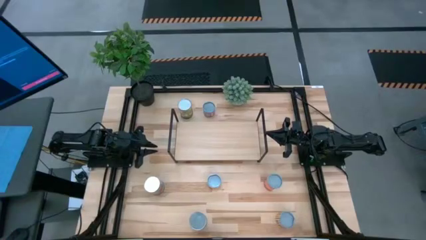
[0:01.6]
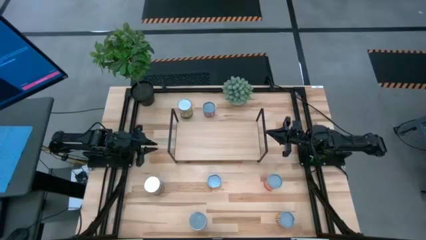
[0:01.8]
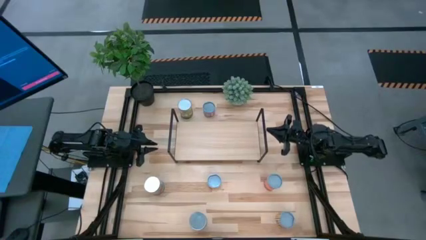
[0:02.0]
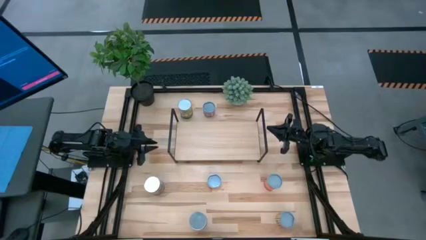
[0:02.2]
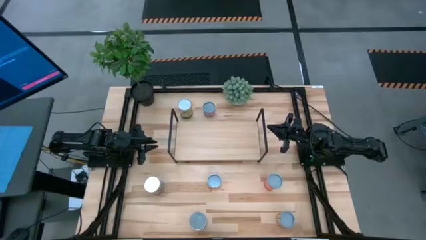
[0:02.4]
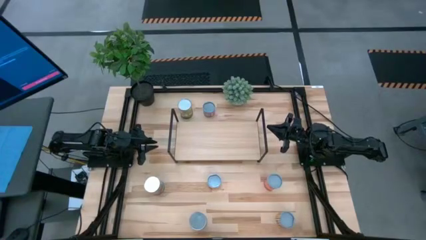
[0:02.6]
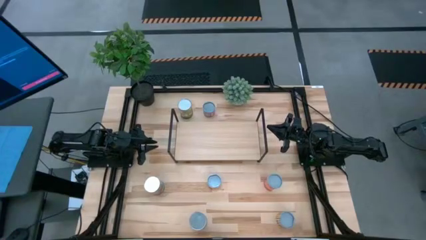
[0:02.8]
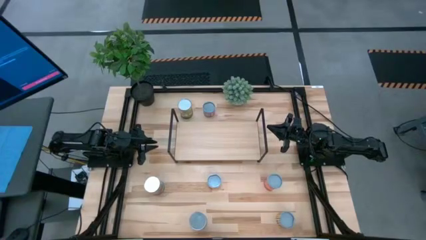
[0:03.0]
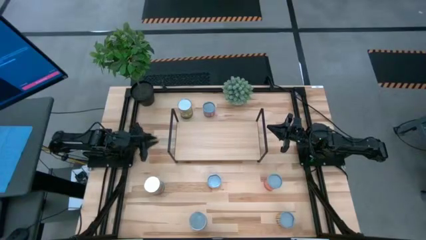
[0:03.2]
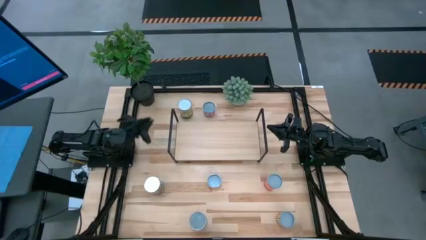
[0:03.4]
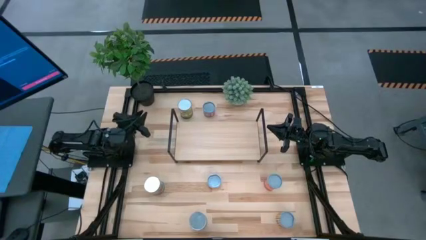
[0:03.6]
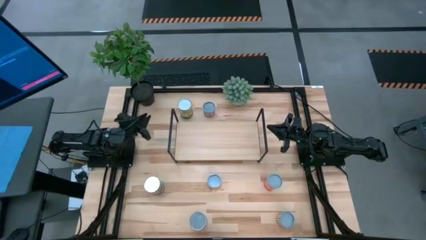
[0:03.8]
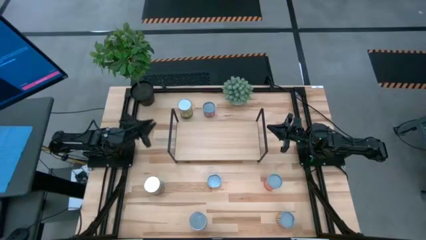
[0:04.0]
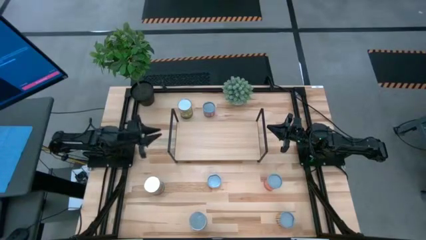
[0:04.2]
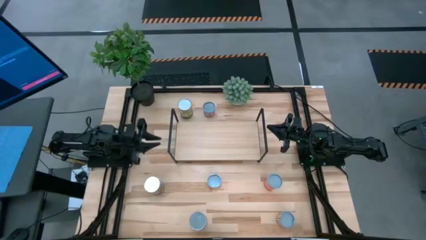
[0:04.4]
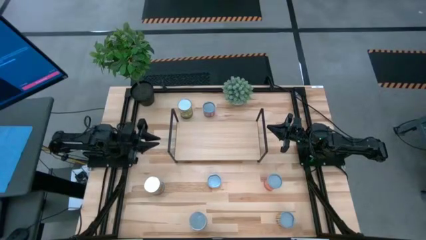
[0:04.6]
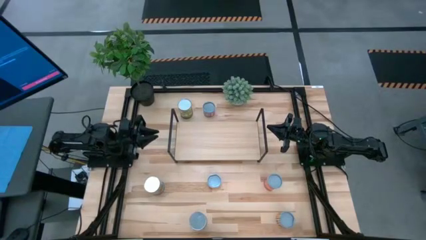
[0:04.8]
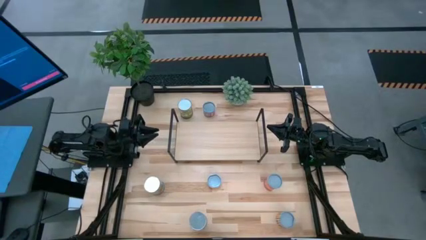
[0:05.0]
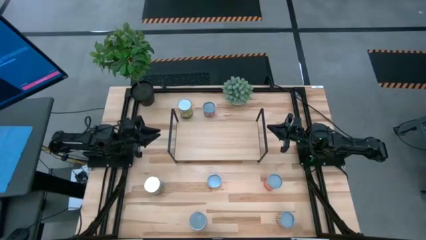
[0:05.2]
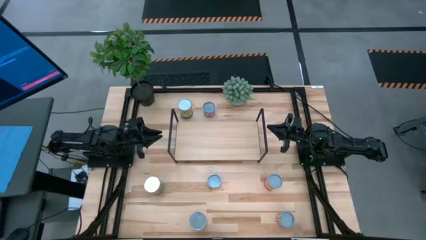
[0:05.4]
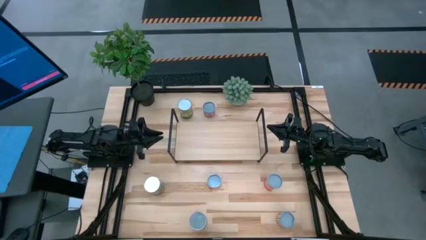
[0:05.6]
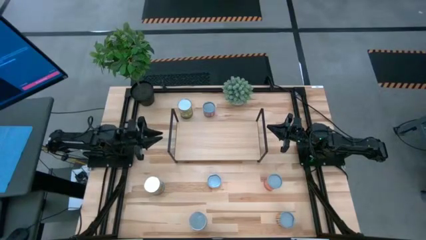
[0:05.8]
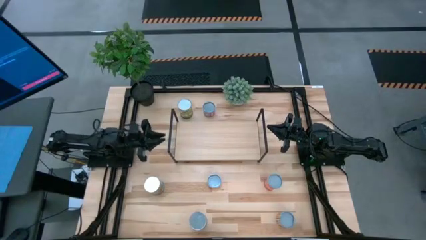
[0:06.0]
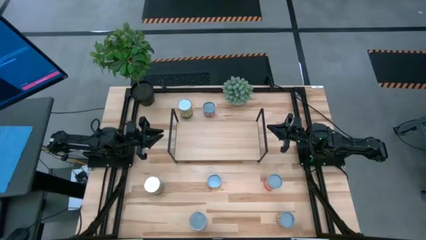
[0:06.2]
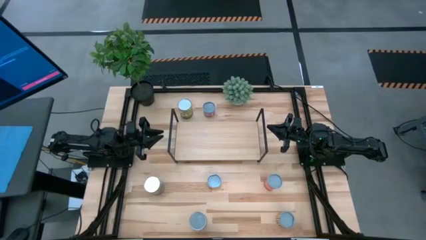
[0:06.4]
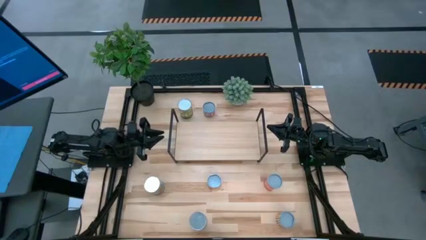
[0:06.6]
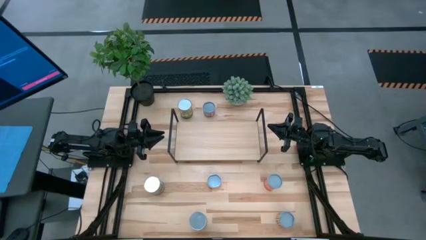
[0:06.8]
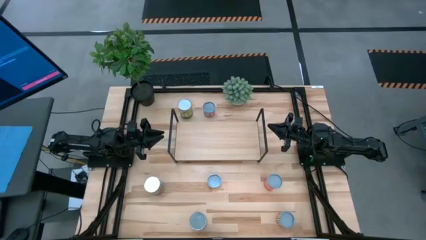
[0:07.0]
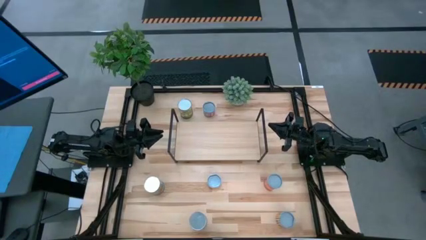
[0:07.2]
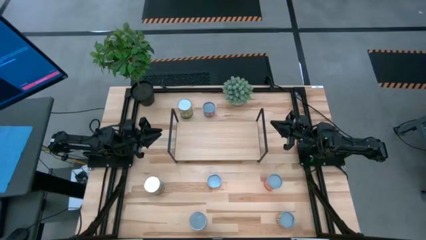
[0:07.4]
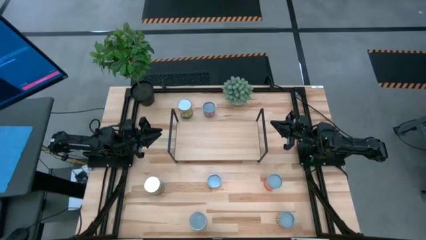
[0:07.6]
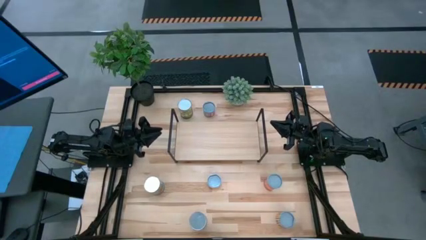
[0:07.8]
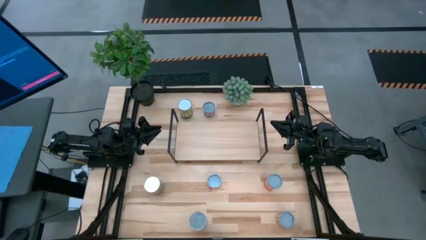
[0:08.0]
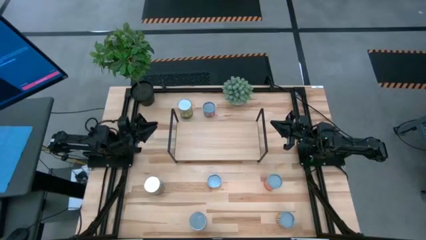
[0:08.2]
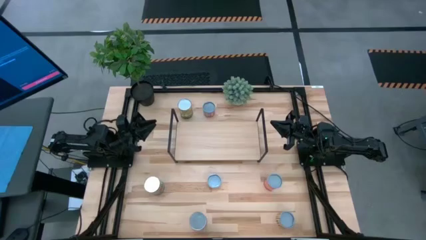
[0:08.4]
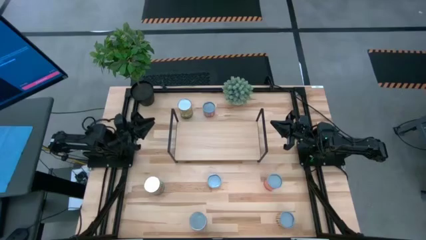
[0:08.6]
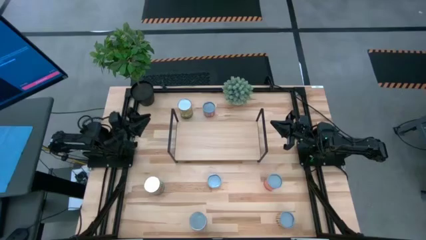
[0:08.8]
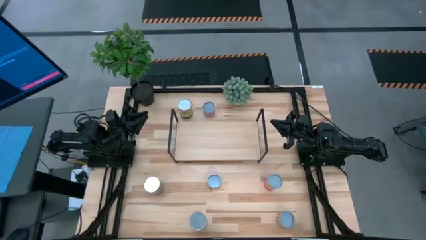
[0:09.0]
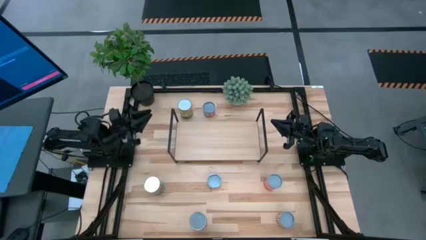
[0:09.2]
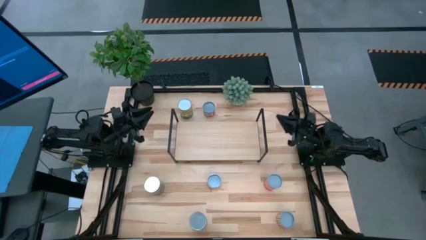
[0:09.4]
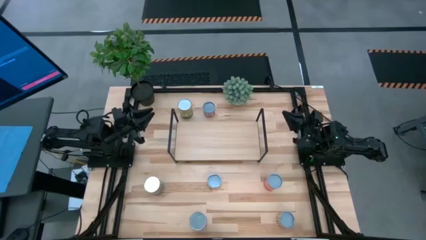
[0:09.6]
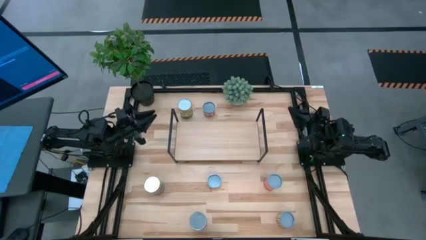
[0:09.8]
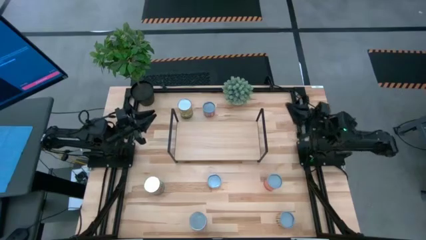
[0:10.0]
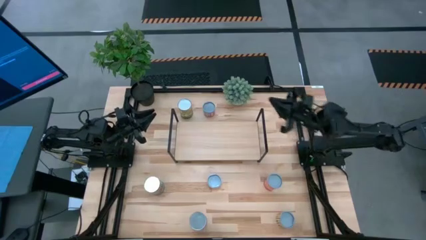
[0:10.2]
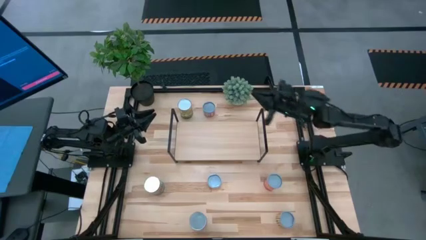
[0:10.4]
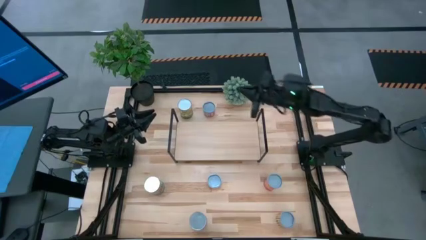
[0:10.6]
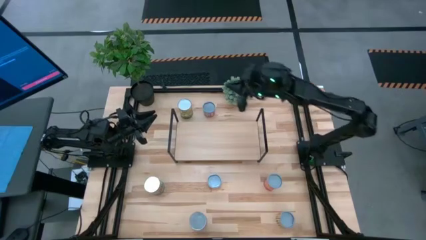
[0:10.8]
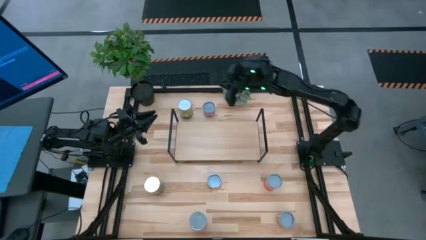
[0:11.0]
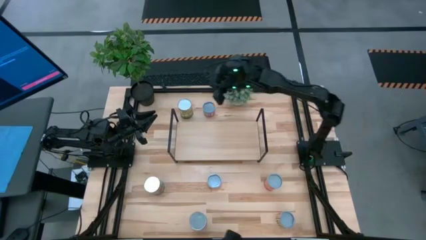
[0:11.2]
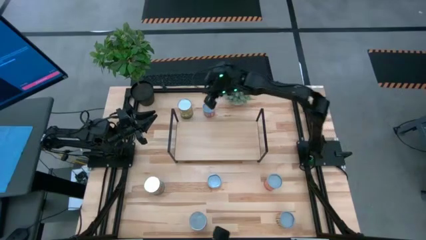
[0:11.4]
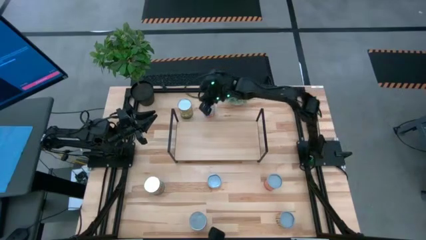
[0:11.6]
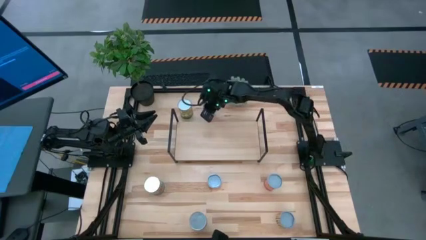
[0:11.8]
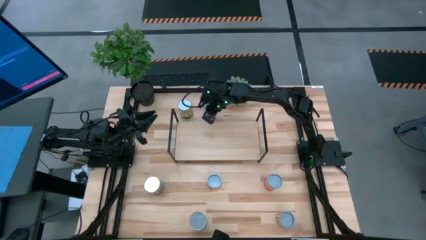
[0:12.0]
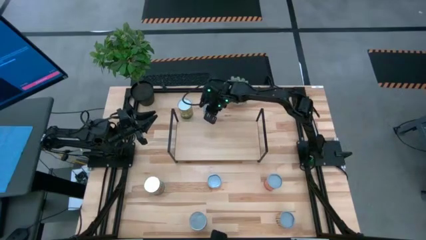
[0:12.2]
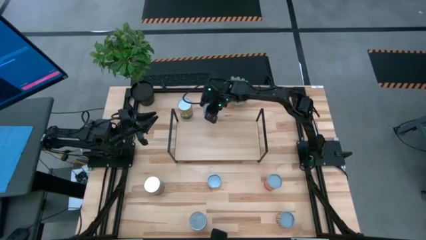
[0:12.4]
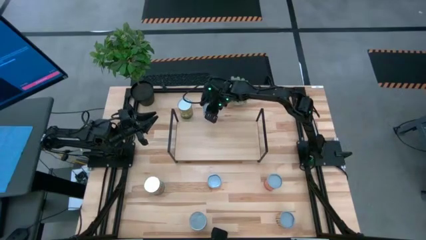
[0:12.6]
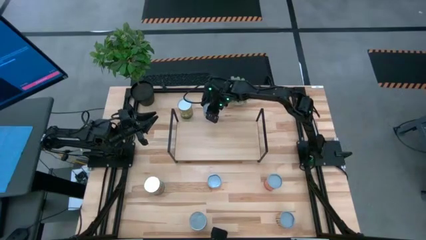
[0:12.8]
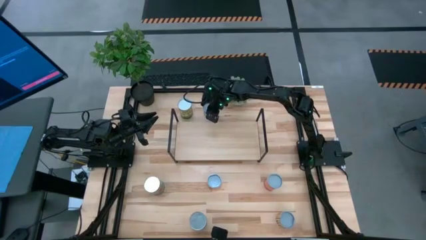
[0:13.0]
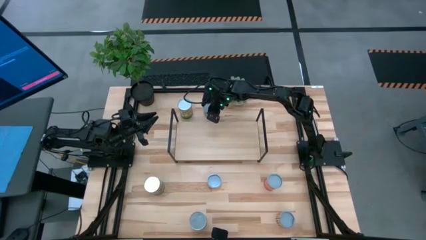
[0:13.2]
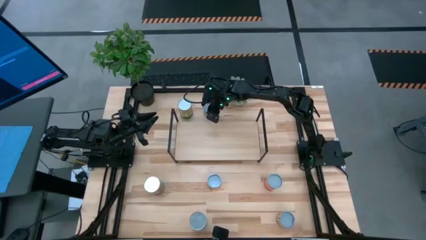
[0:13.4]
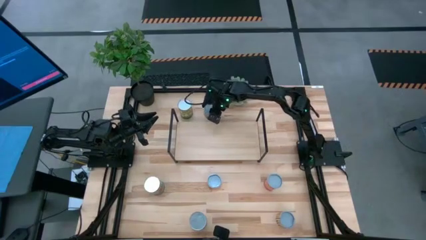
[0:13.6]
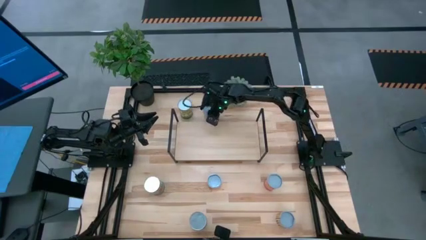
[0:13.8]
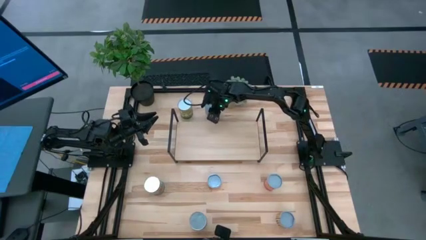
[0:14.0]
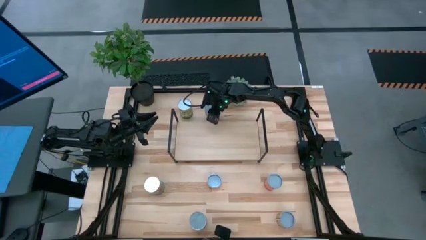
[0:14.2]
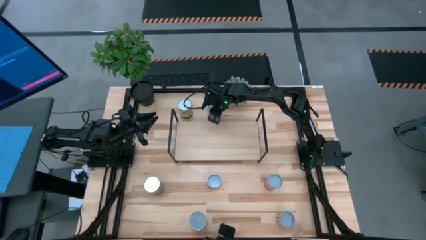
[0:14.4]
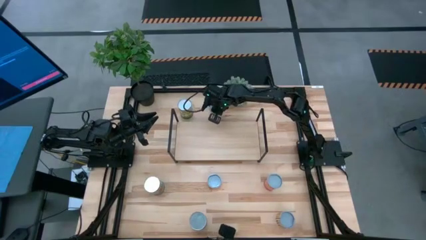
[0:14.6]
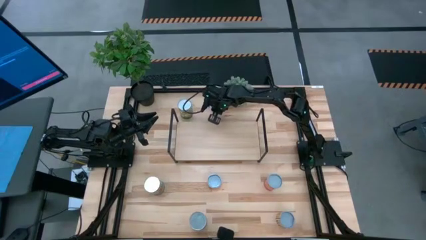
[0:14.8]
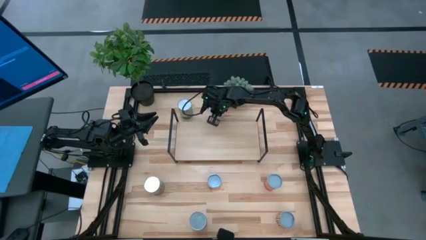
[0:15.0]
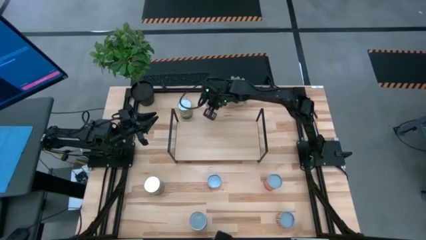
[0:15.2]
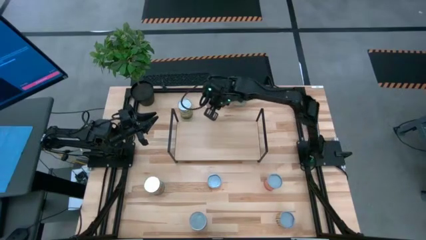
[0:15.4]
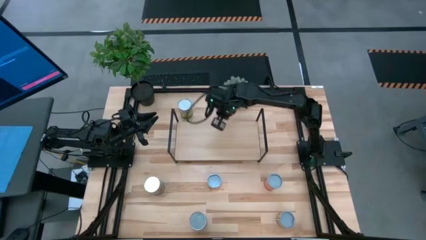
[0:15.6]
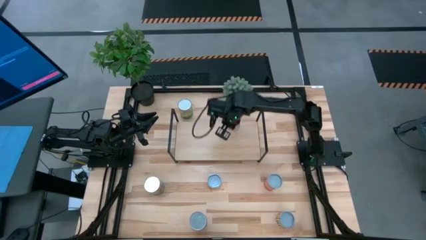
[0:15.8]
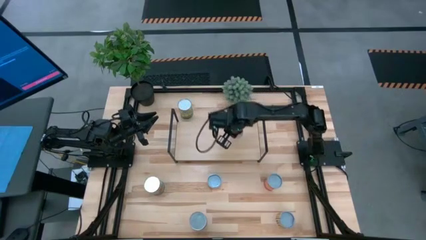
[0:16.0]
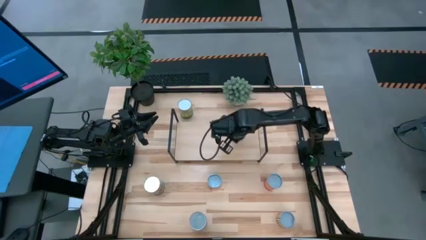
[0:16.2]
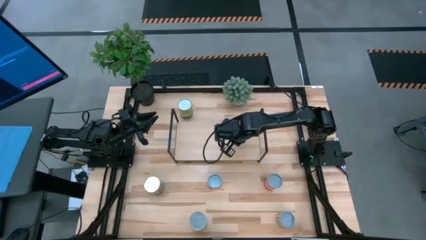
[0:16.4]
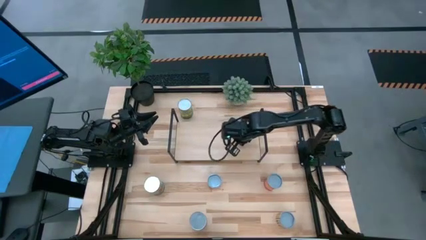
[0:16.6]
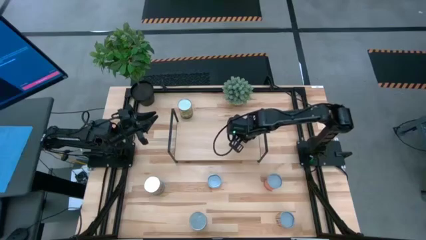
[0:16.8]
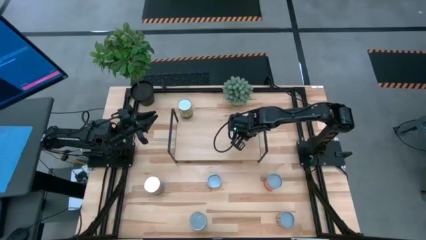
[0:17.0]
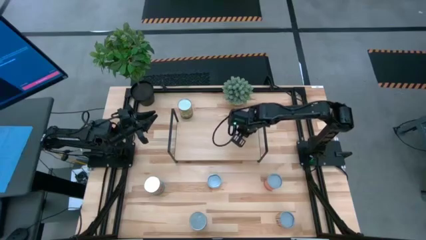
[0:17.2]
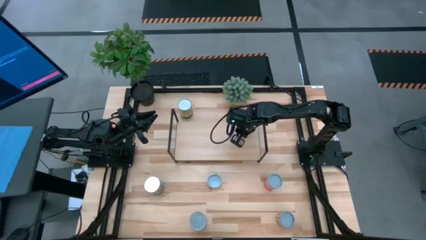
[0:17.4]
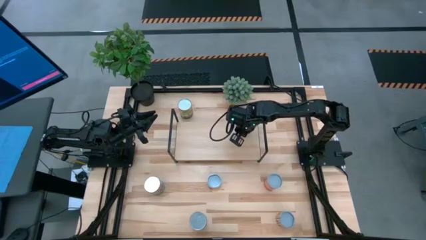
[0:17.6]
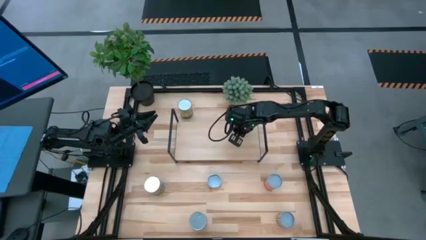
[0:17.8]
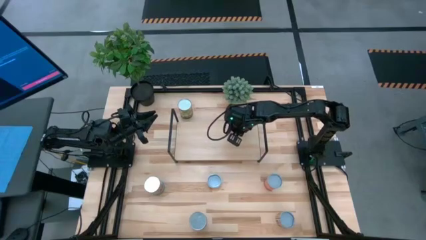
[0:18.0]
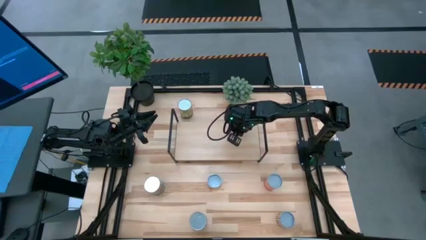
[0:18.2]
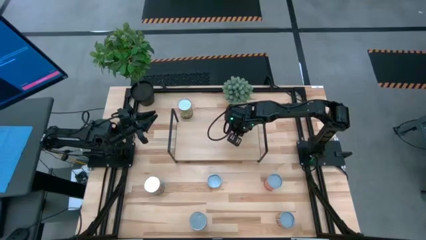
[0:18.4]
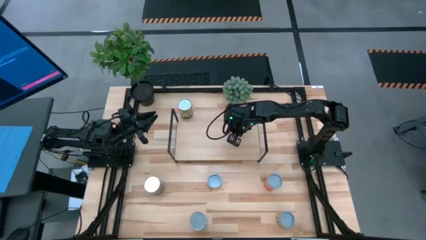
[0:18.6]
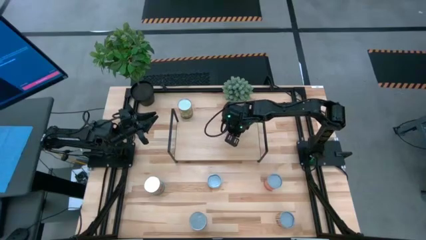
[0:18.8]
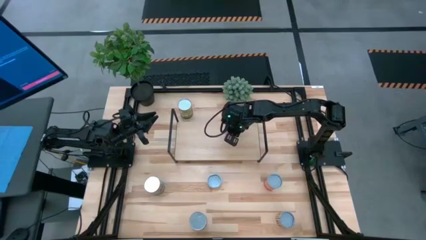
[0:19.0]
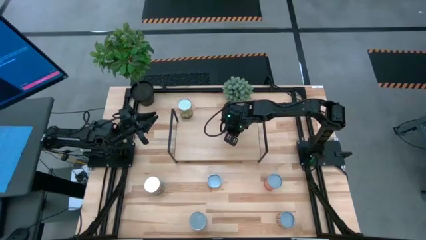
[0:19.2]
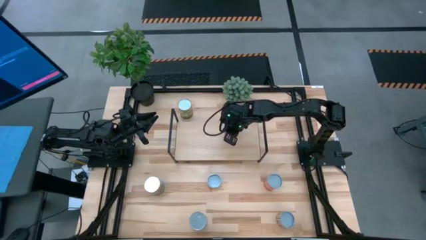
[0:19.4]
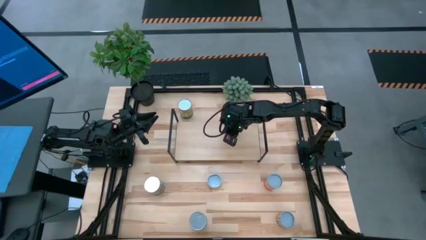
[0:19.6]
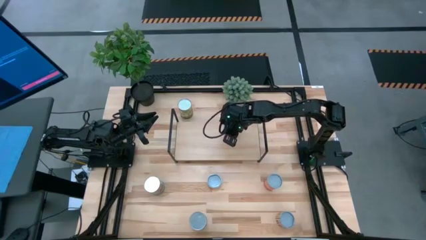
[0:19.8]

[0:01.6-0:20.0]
Task: Pick and place cans onto a shelf
Put the canned corn on the shelf
